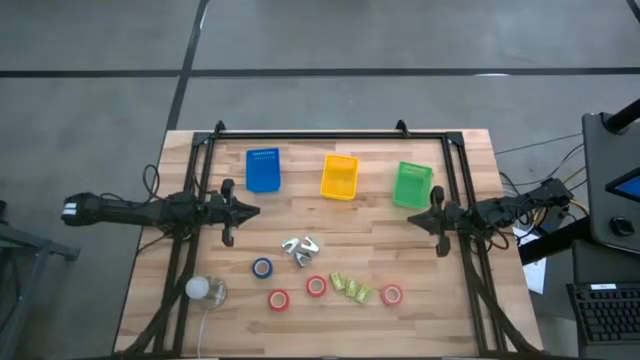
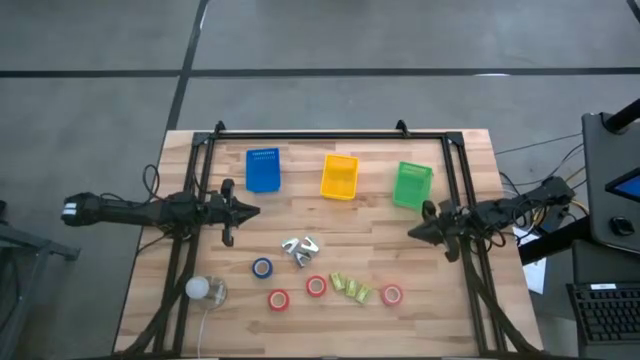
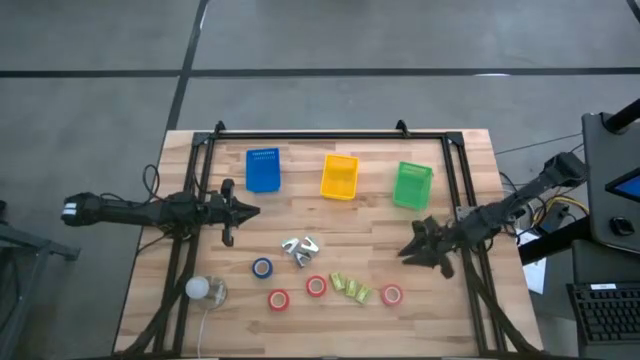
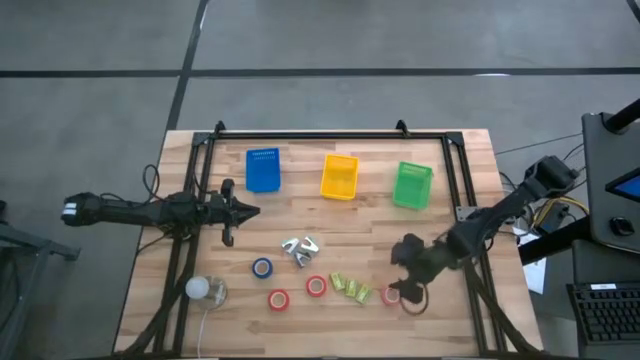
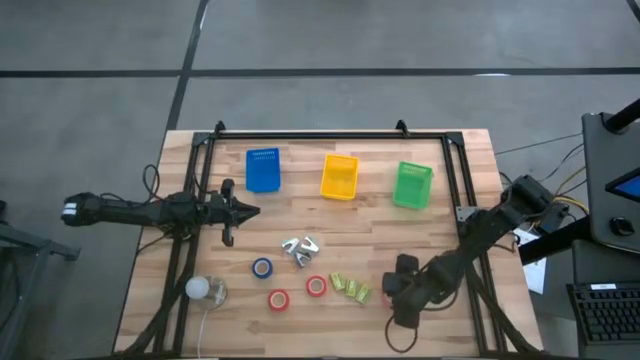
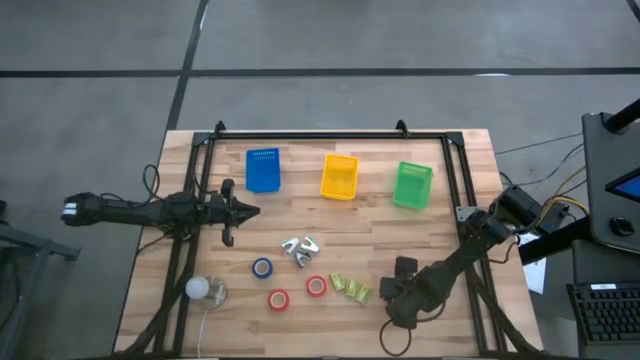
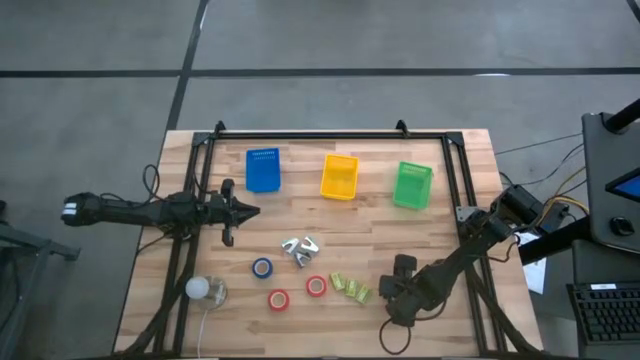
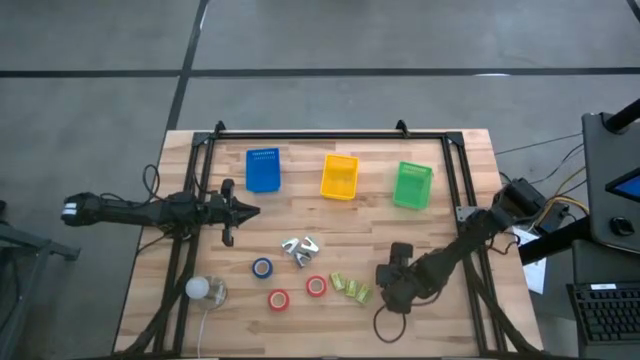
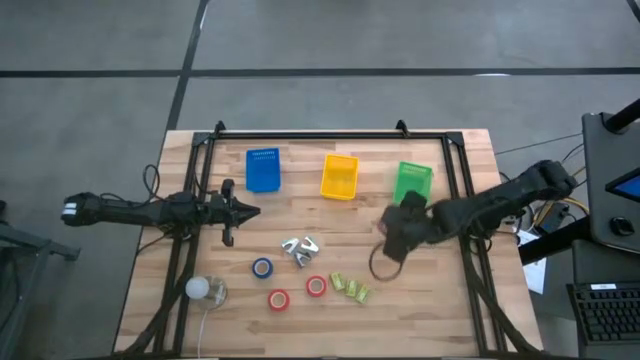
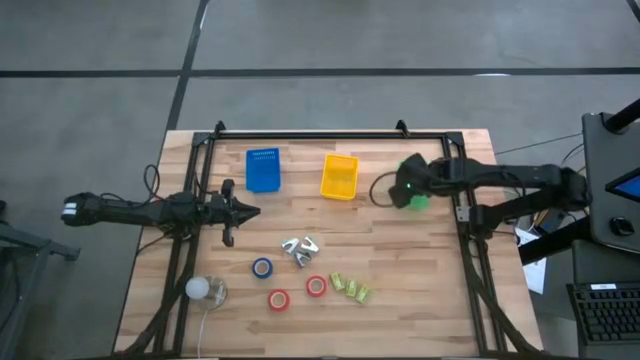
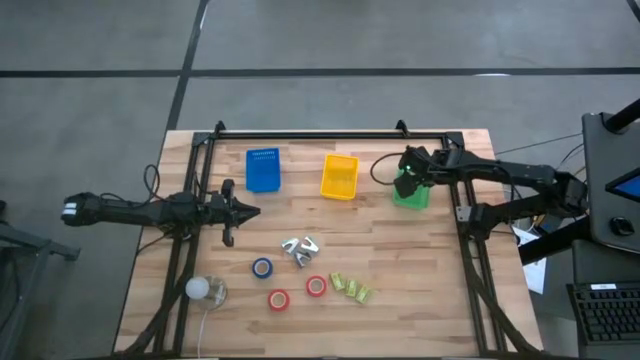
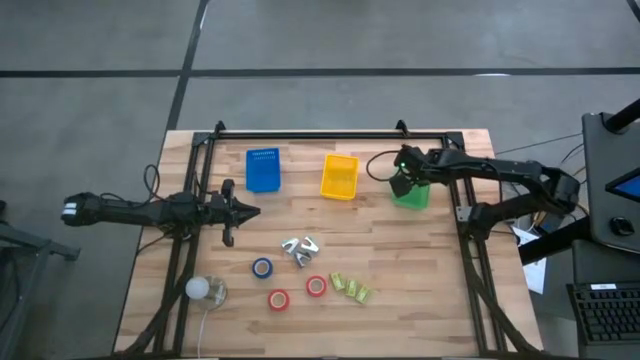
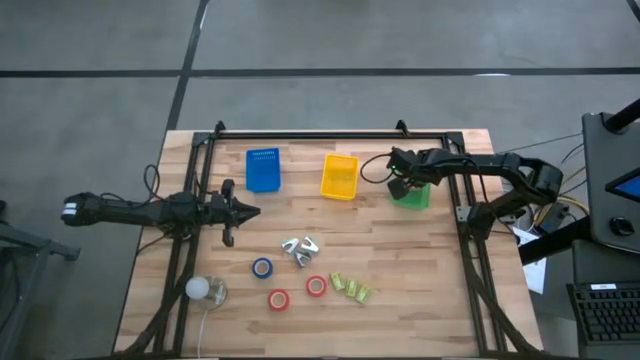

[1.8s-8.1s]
Task: Pick and place Stapler, Stapler remover, tape
Put the pink tape into the green bin

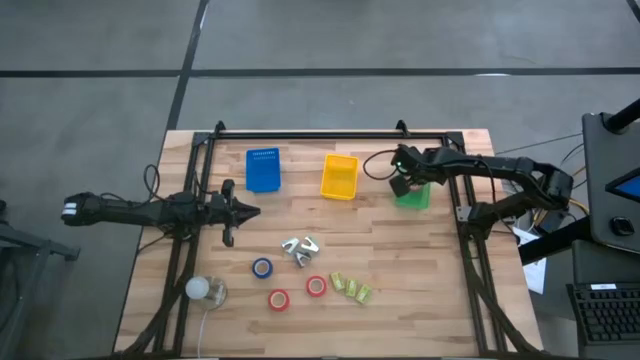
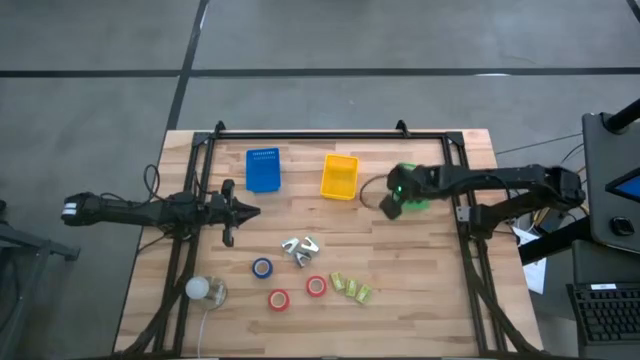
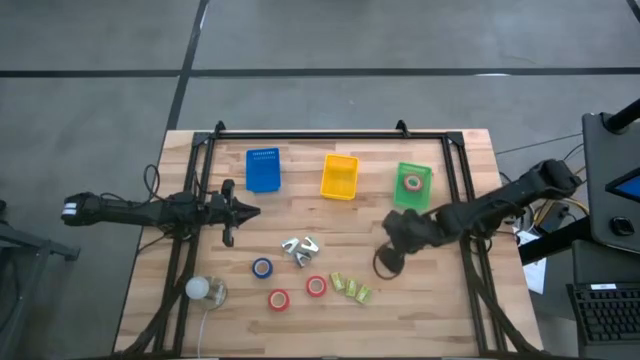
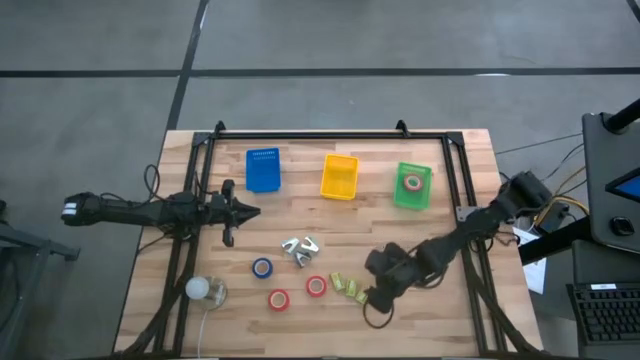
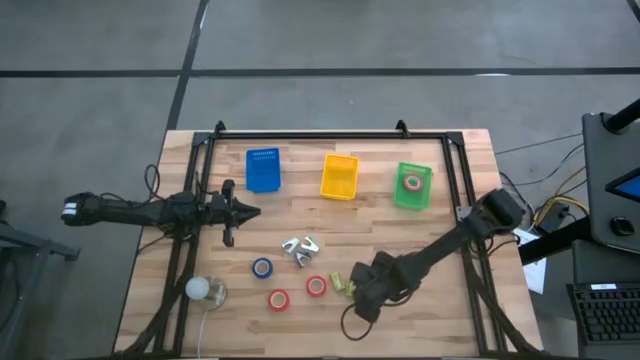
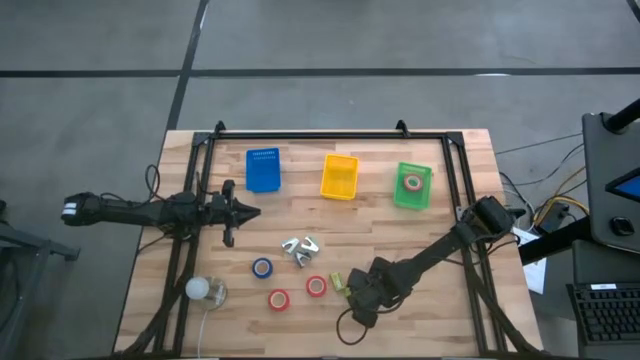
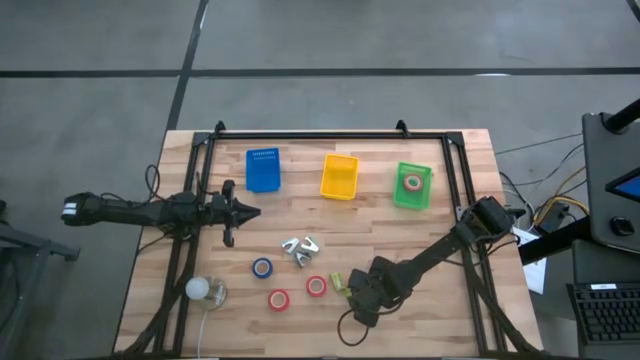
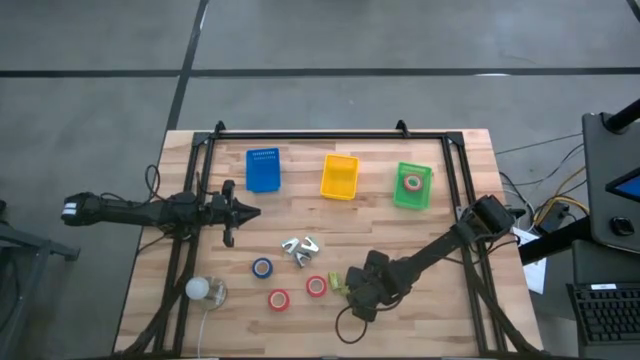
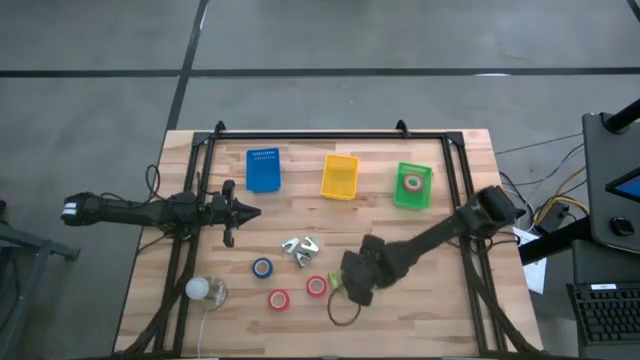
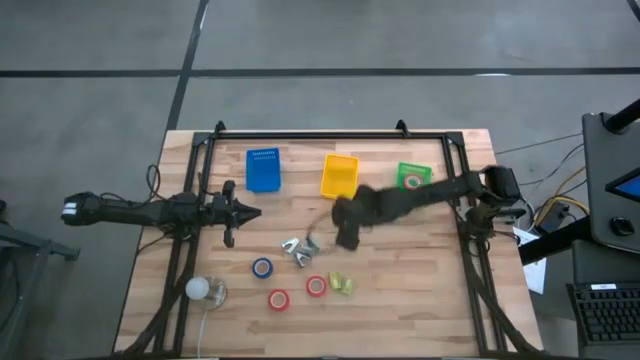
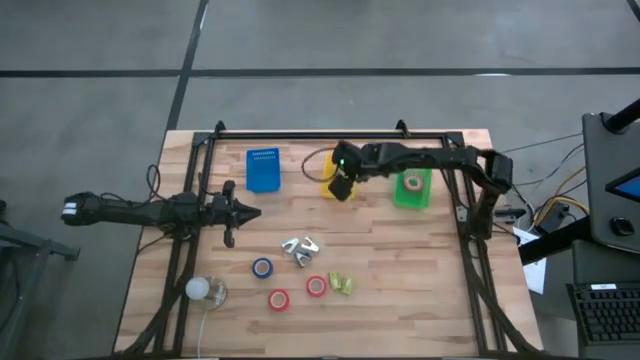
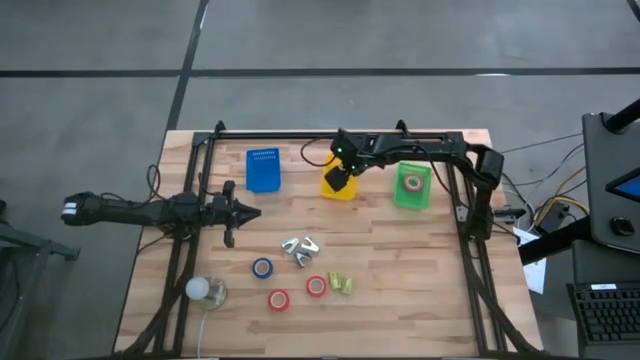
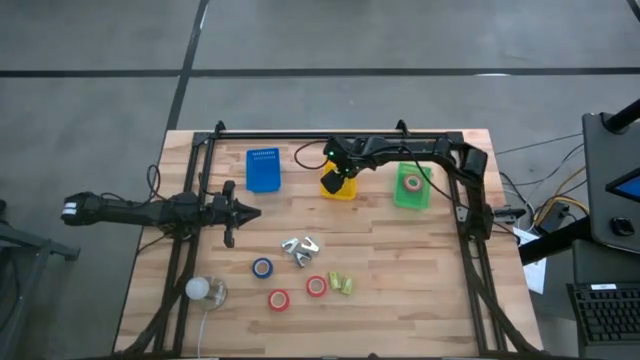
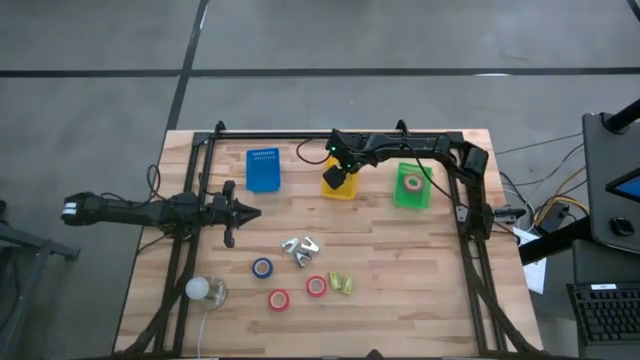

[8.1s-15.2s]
Put the right green staple box into the yellow bin

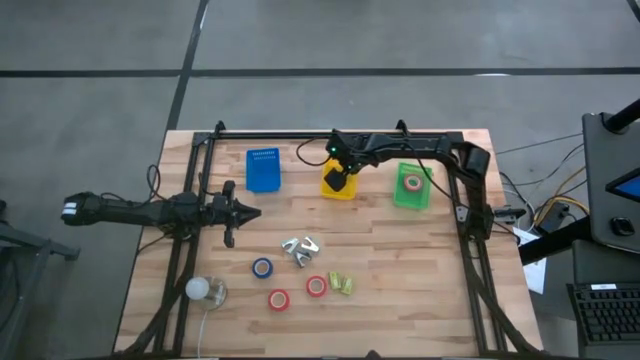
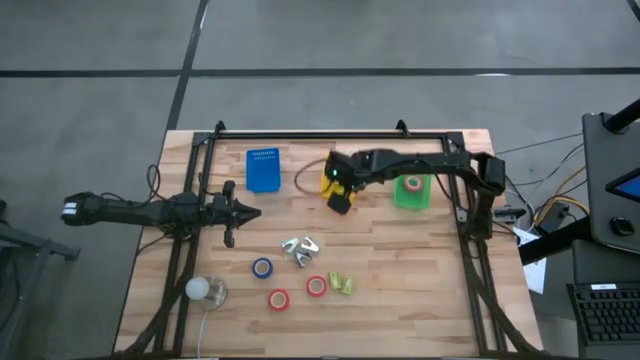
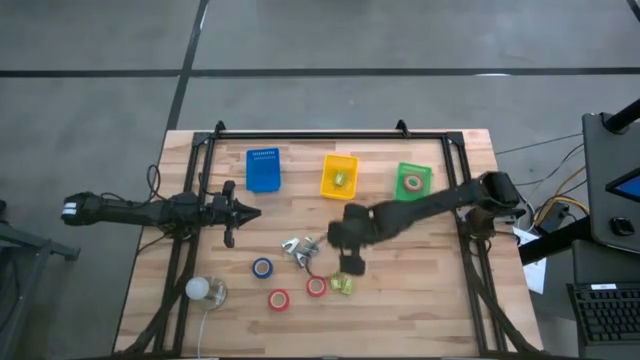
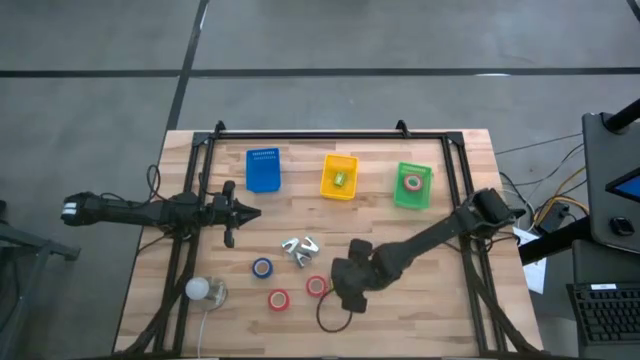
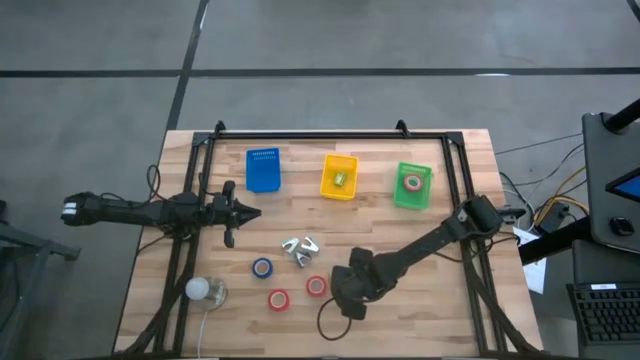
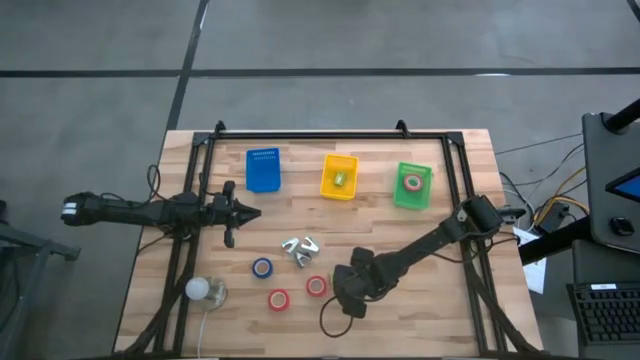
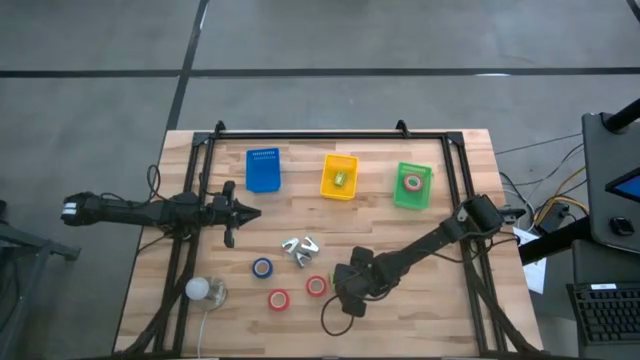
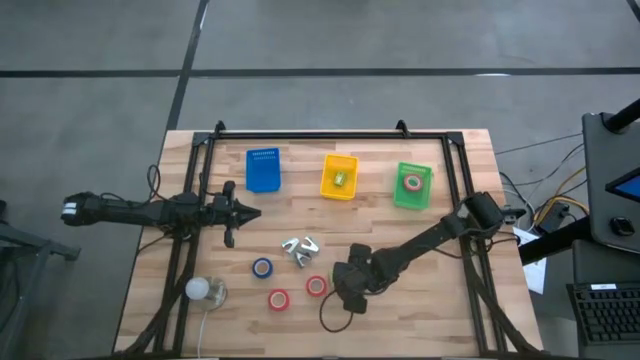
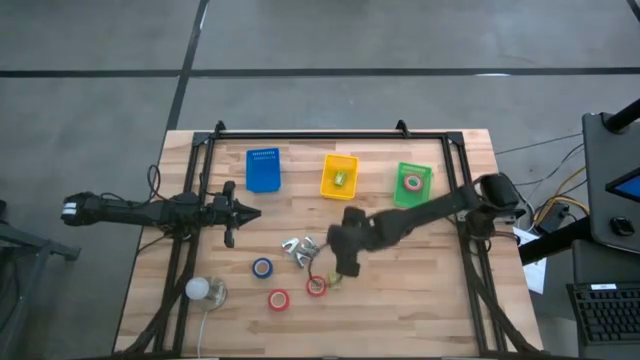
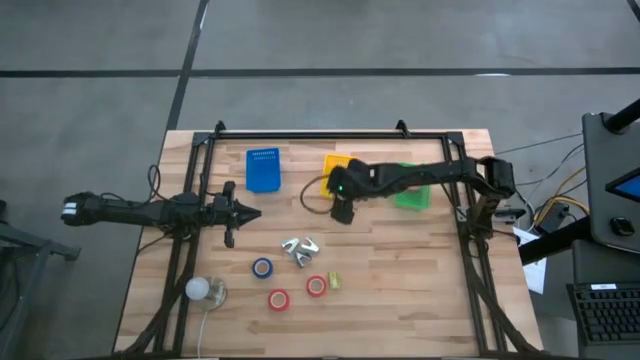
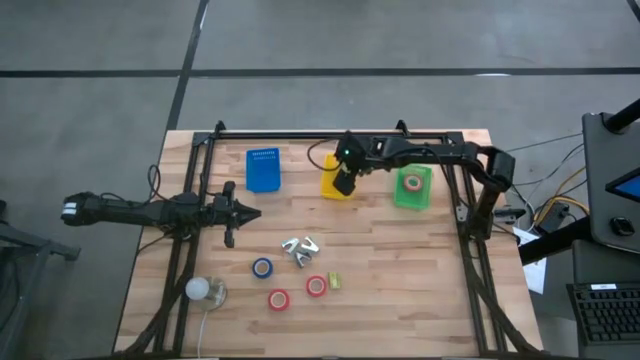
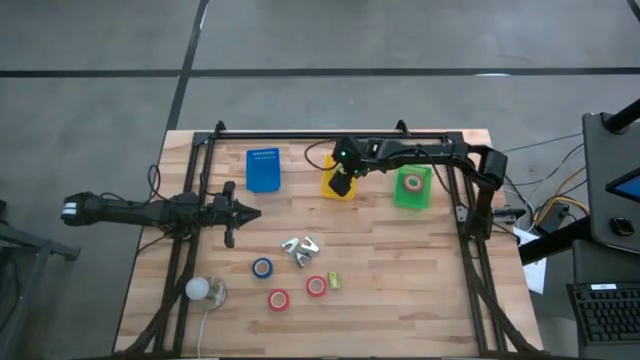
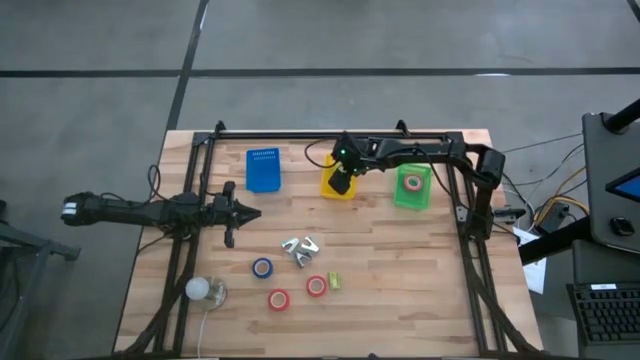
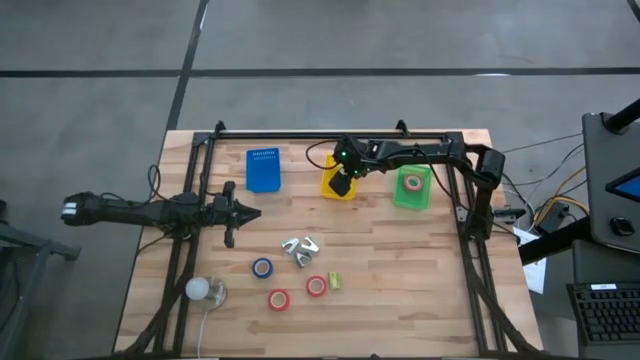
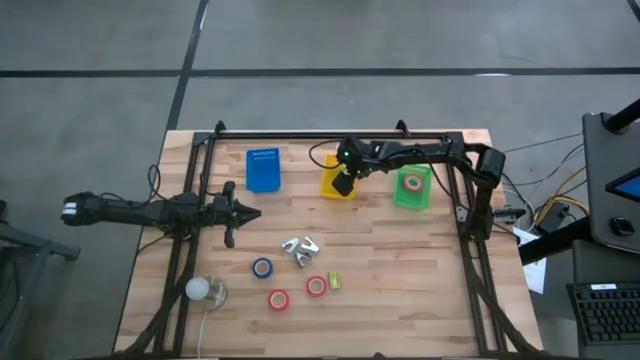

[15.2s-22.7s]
Put the right green staple box into the yellow bin

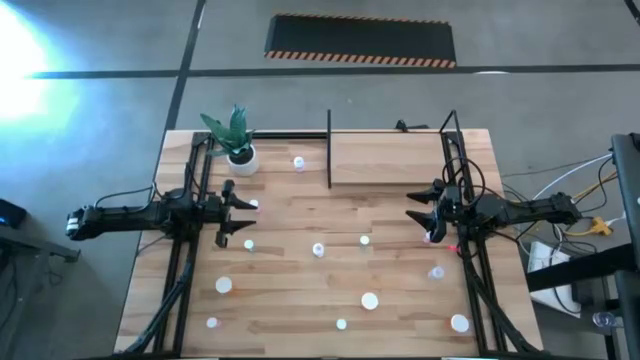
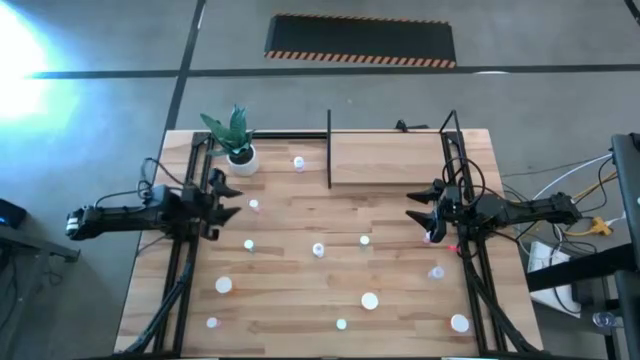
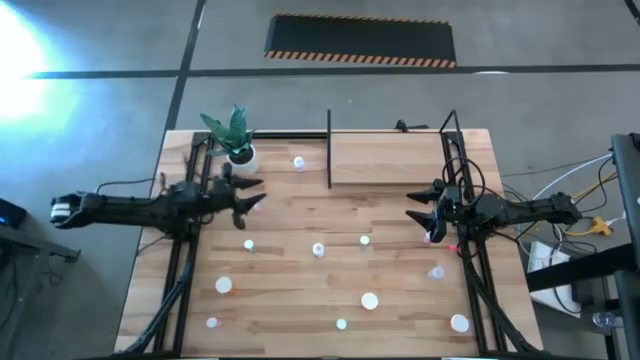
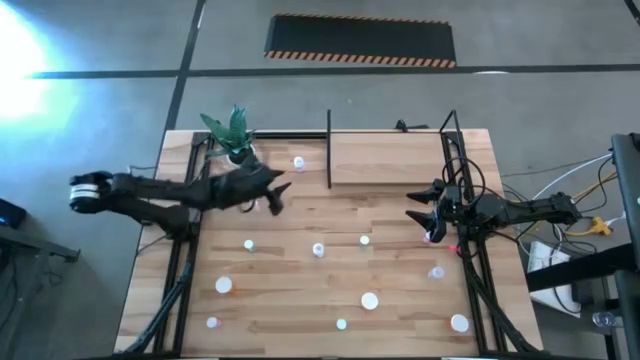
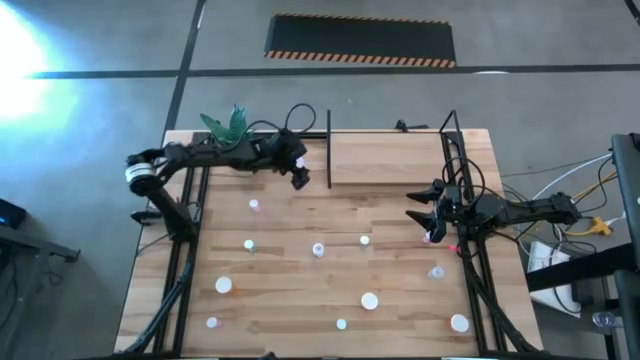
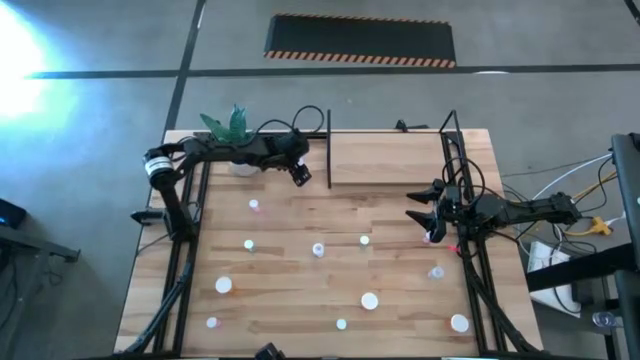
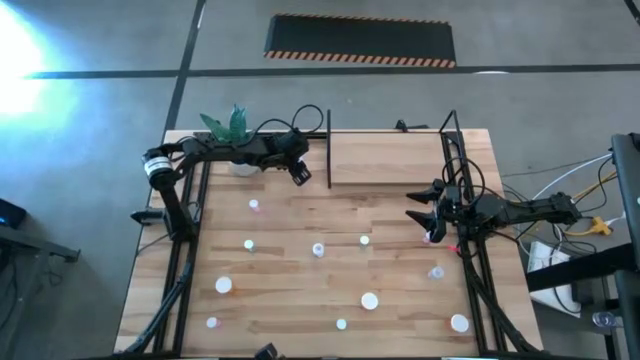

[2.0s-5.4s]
Task: Pick and place medicine bottles onto shelf by color
Put the top transparent pill bottle on the shelf
